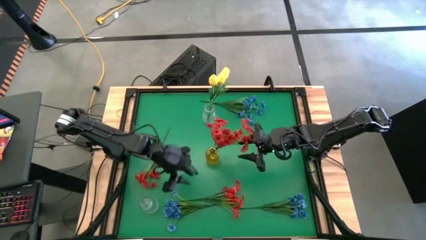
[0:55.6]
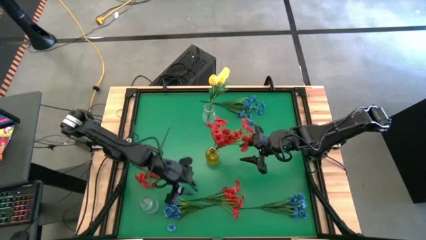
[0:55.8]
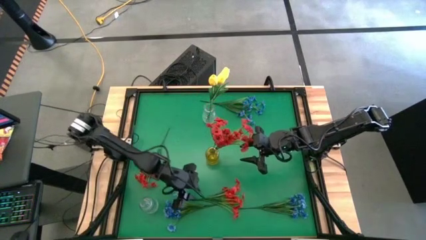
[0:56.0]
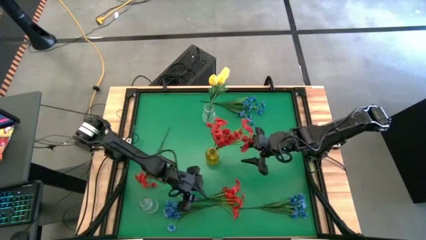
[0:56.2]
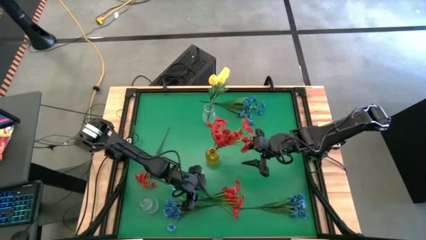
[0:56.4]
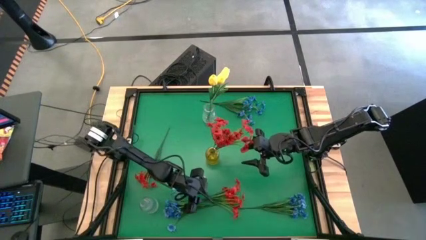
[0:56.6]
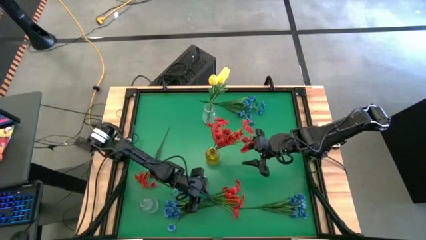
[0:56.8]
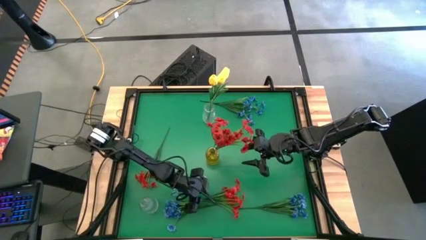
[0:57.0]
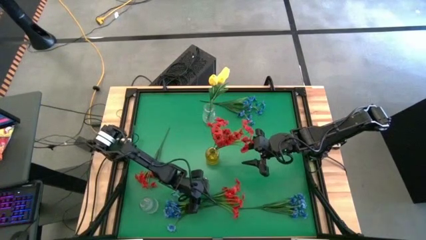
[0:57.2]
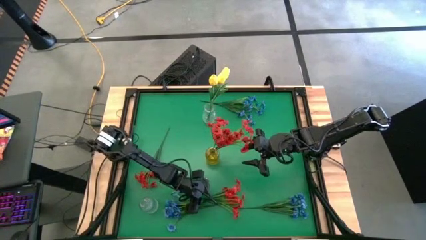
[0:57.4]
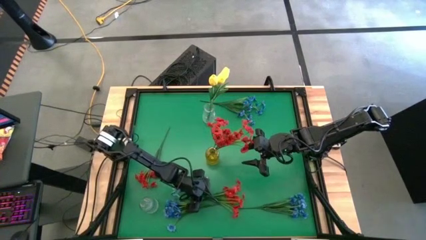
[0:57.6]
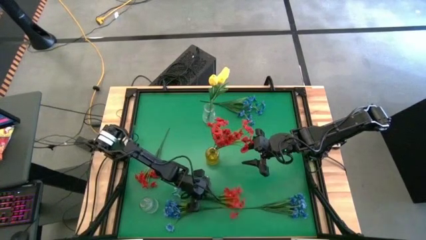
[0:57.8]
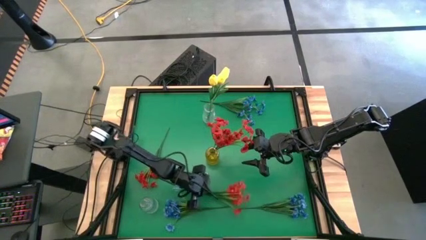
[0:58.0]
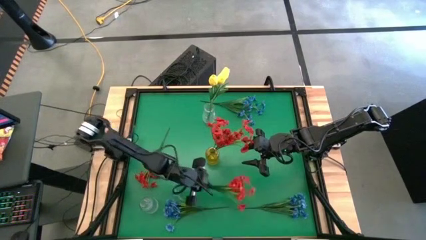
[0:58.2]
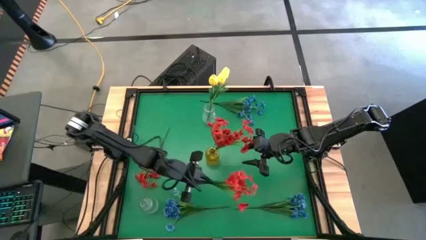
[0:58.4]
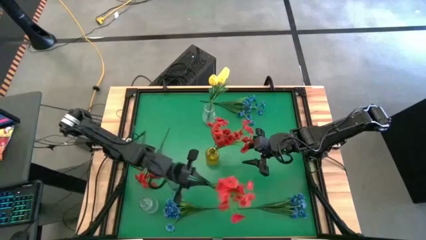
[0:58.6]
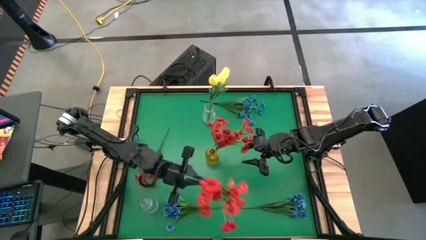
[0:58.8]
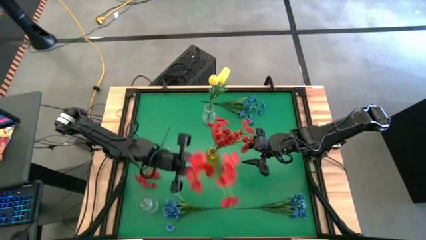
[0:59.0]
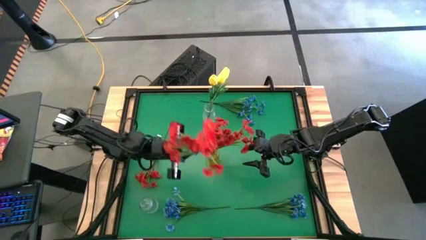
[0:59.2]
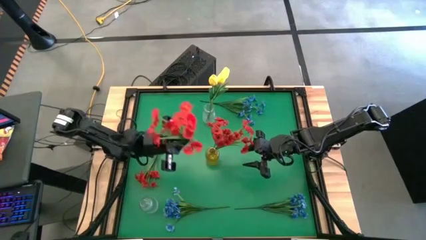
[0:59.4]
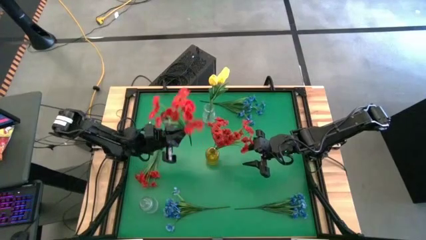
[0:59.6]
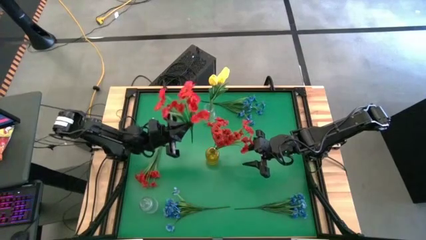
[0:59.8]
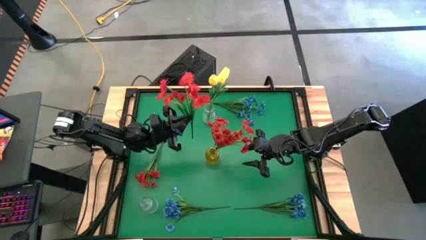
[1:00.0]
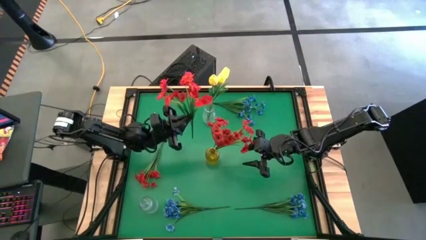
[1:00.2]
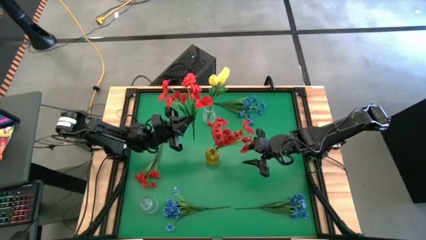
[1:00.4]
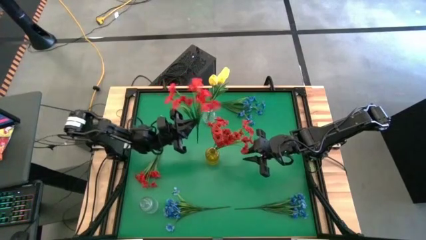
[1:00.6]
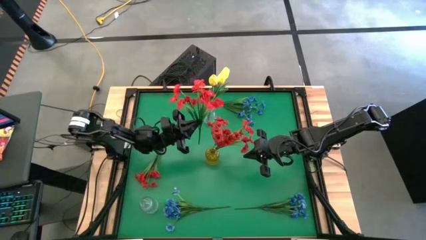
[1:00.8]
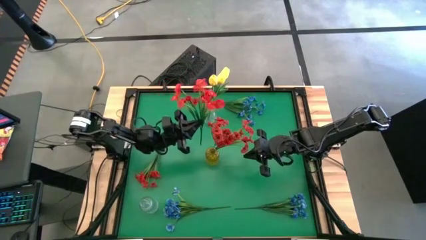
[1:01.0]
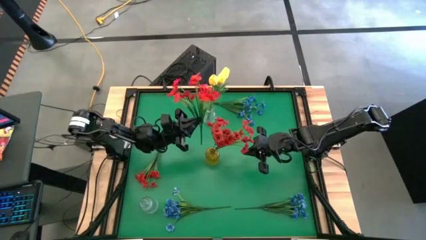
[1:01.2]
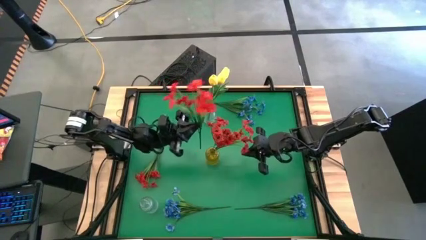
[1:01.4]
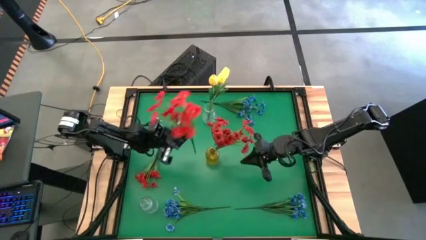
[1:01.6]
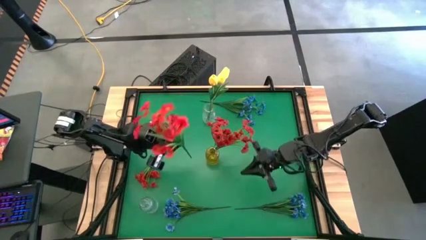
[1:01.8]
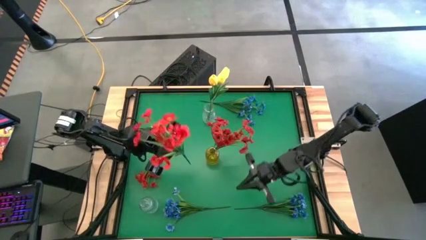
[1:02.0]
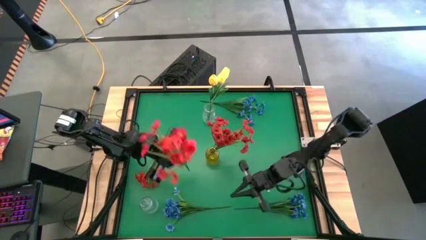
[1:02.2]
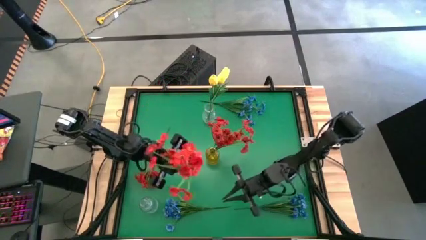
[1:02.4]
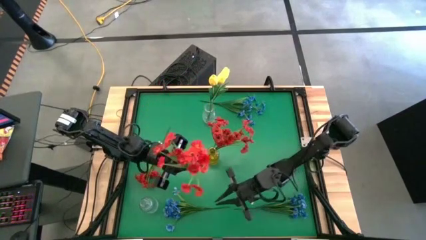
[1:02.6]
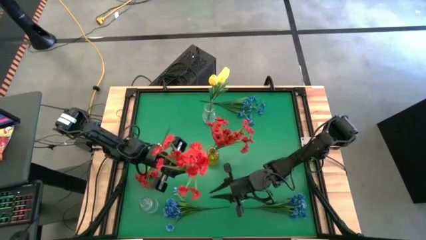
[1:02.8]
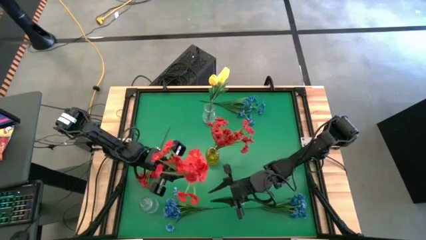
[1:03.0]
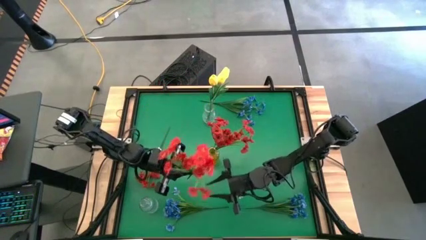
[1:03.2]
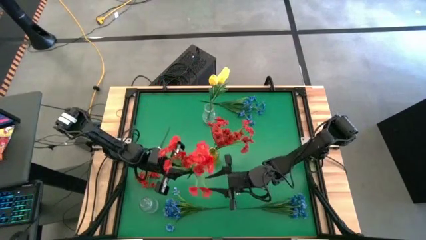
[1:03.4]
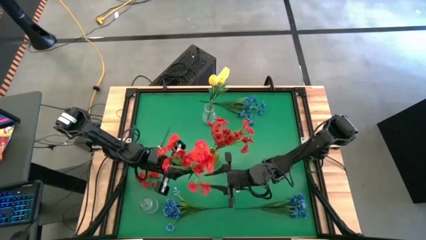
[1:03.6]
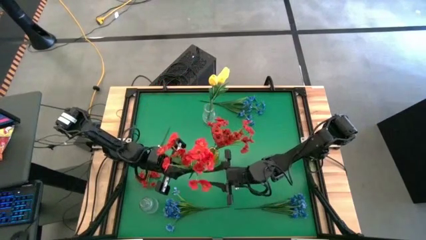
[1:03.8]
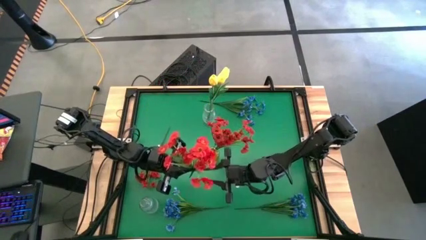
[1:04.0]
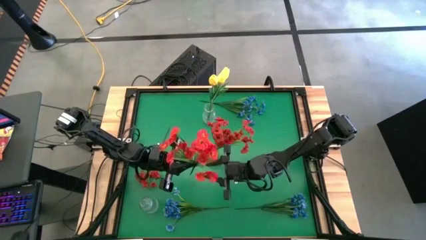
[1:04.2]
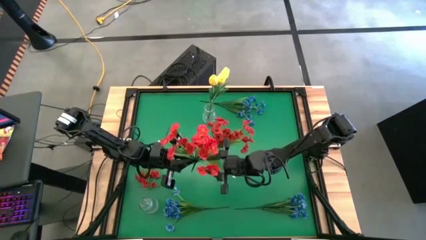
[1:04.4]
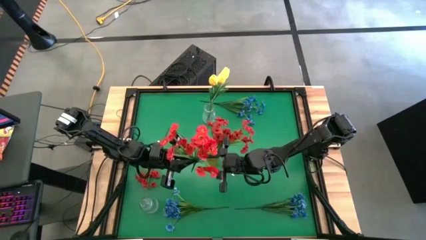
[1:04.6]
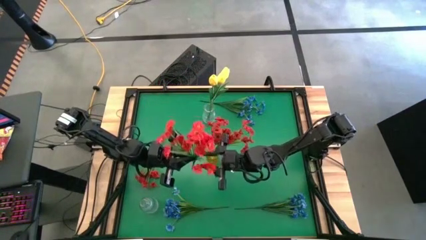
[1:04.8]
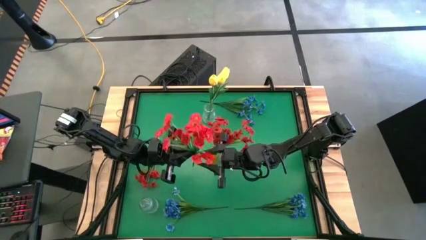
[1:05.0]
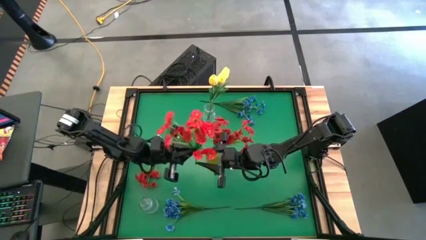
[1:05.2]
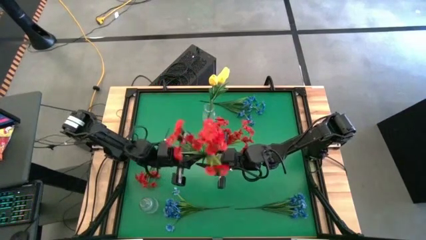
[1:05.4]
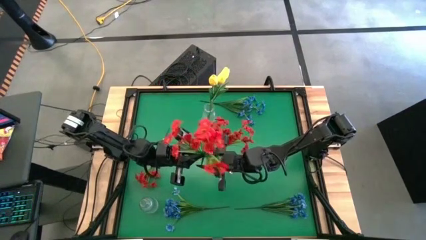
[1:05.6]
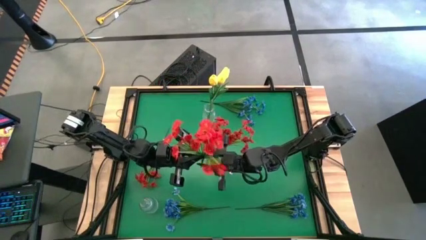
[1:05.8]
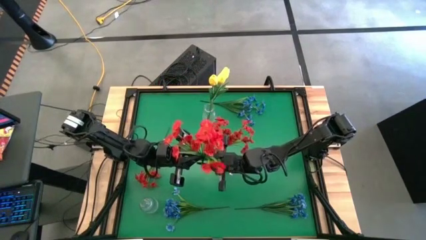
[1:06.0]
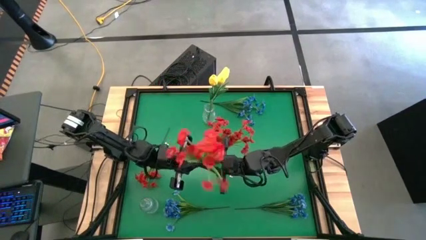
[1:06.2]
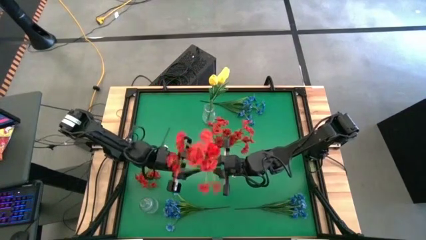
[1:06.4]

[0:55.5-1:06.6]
Task: Sort flowers into vase by color
Put the bottom red flowers into the yellow vase
